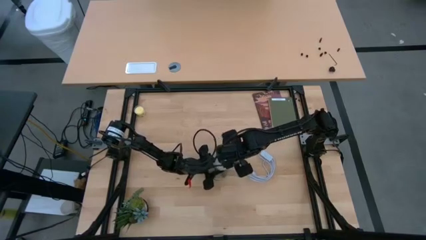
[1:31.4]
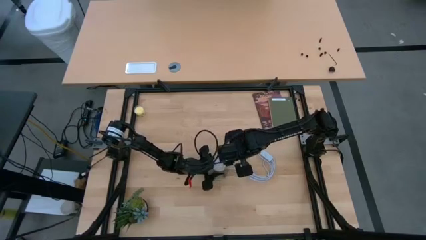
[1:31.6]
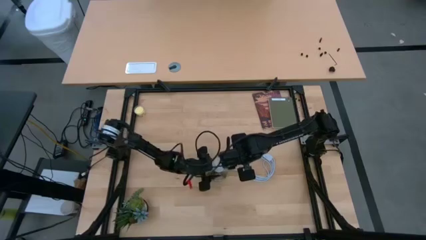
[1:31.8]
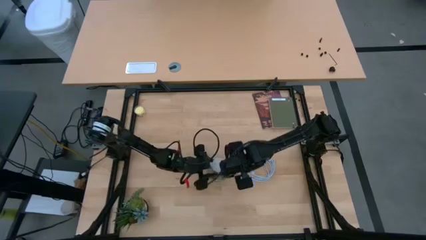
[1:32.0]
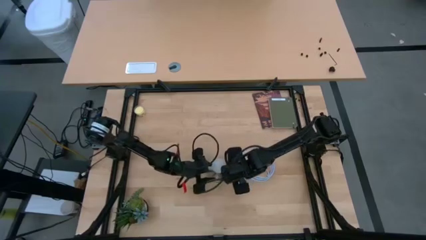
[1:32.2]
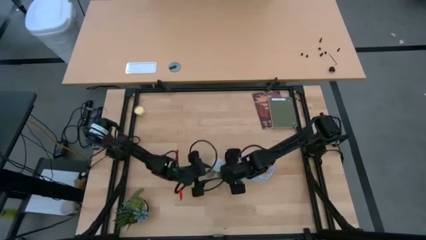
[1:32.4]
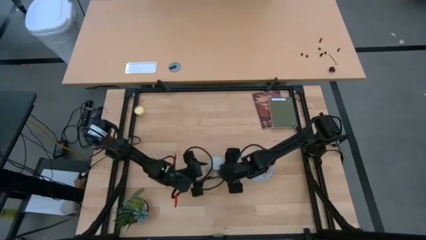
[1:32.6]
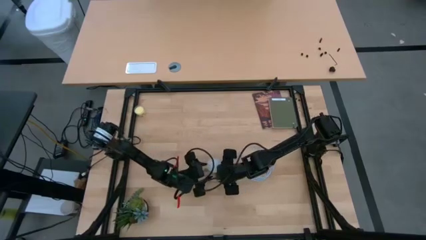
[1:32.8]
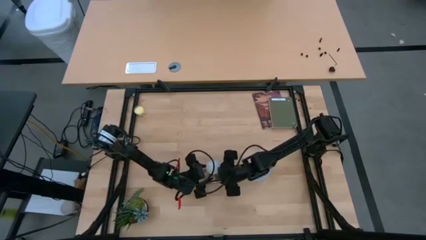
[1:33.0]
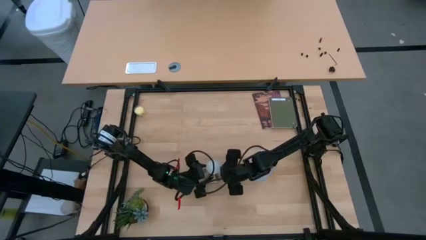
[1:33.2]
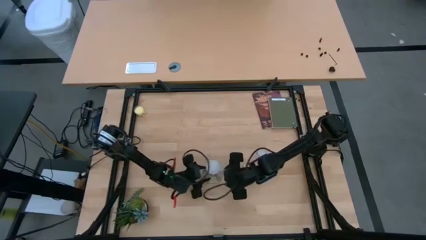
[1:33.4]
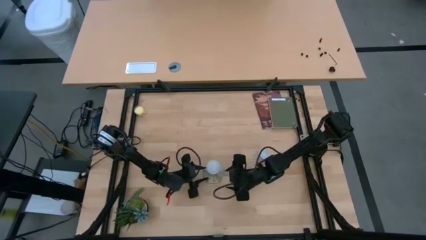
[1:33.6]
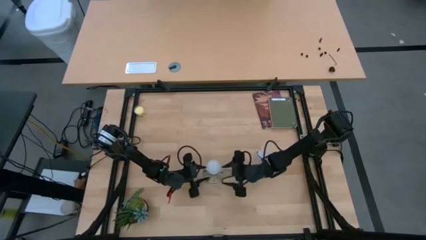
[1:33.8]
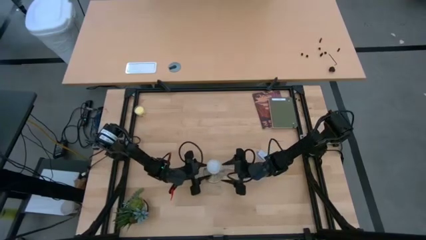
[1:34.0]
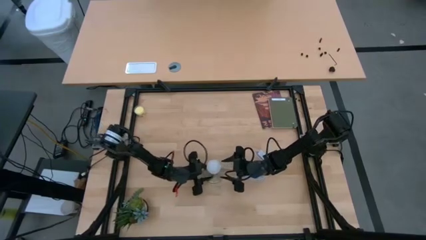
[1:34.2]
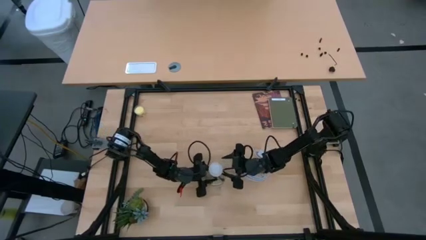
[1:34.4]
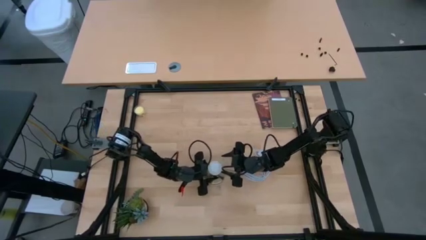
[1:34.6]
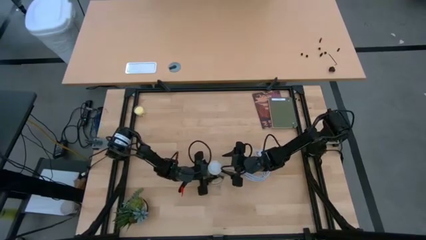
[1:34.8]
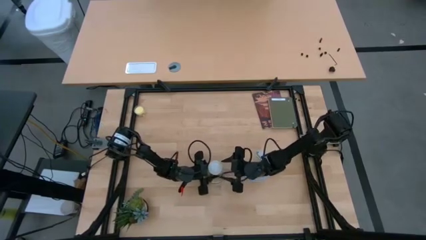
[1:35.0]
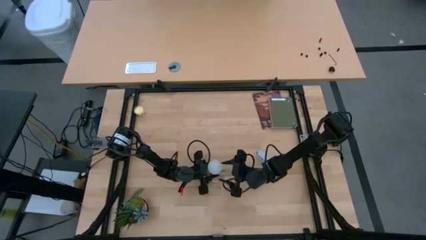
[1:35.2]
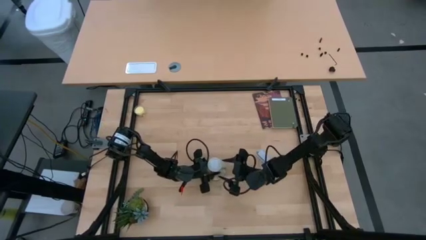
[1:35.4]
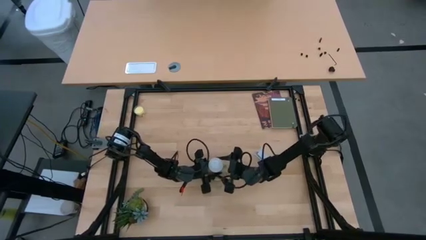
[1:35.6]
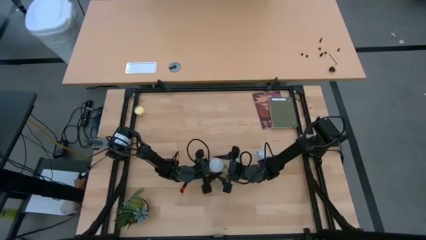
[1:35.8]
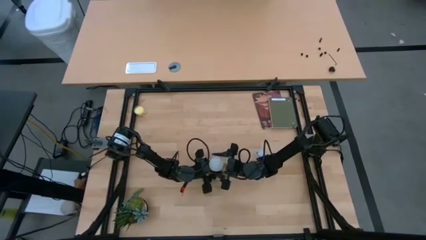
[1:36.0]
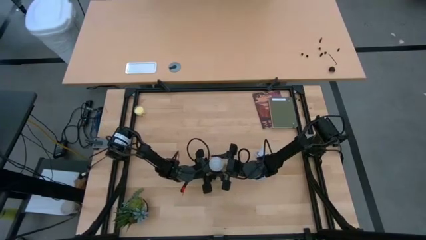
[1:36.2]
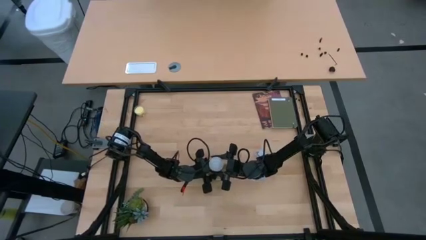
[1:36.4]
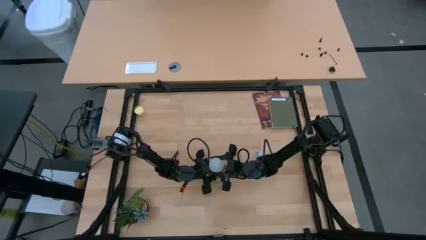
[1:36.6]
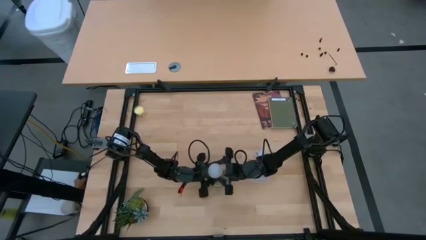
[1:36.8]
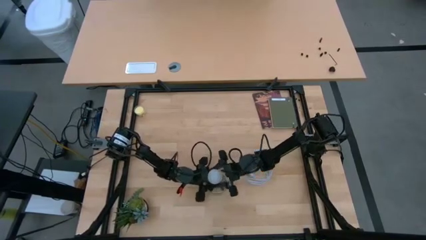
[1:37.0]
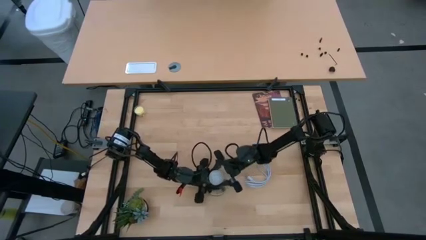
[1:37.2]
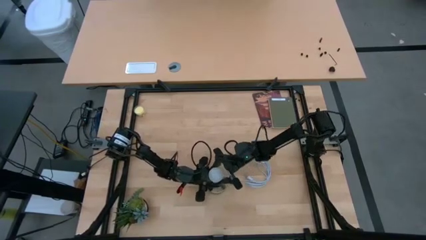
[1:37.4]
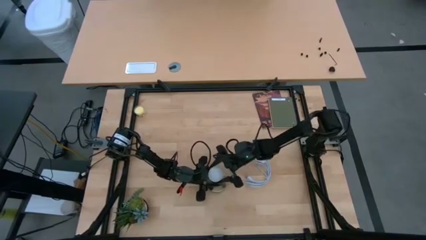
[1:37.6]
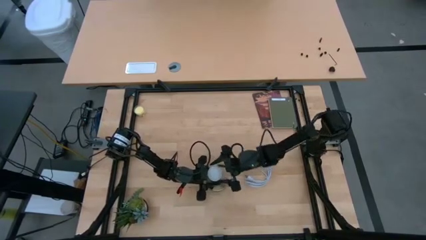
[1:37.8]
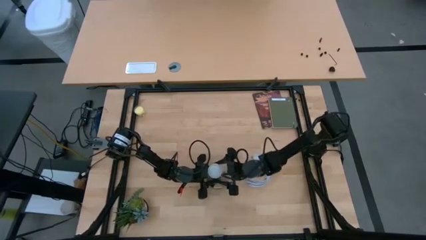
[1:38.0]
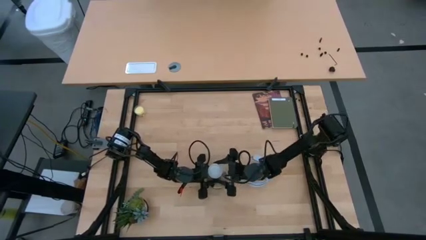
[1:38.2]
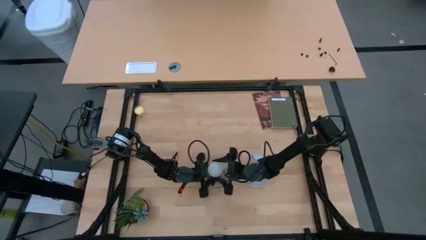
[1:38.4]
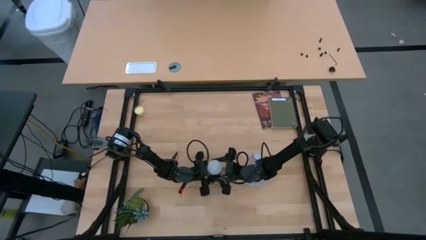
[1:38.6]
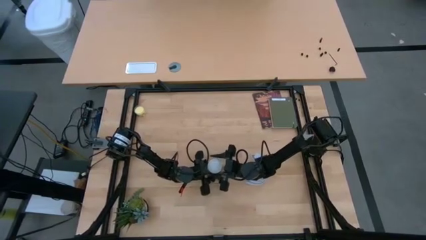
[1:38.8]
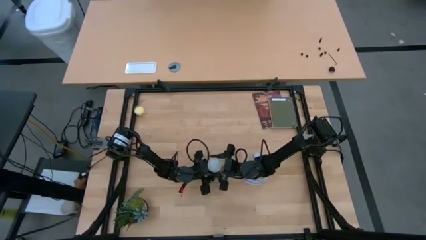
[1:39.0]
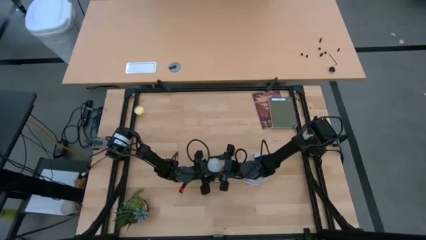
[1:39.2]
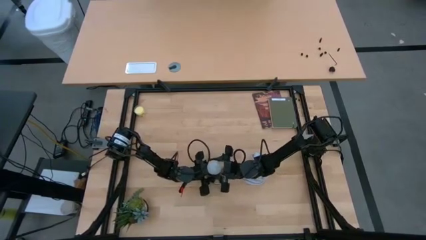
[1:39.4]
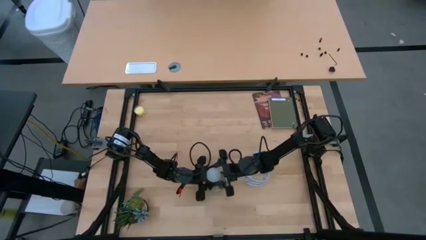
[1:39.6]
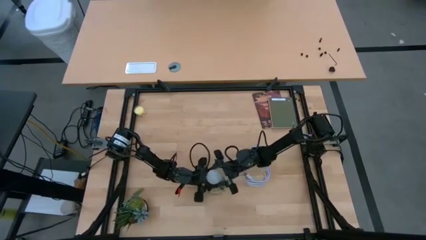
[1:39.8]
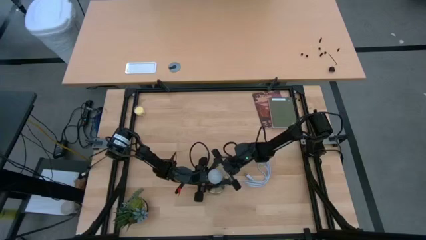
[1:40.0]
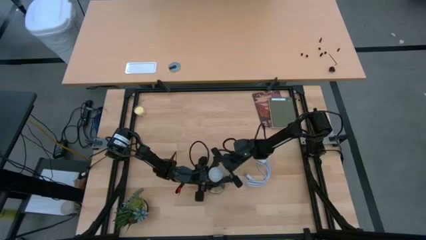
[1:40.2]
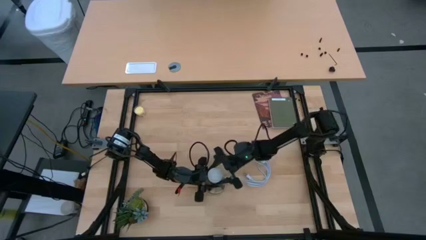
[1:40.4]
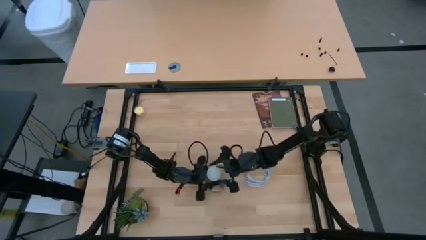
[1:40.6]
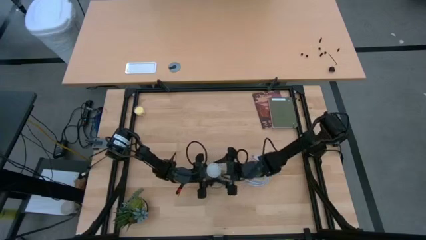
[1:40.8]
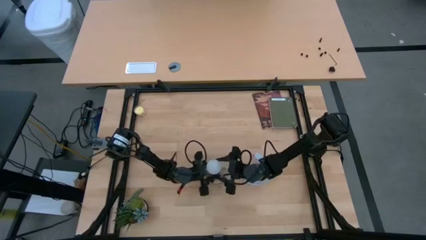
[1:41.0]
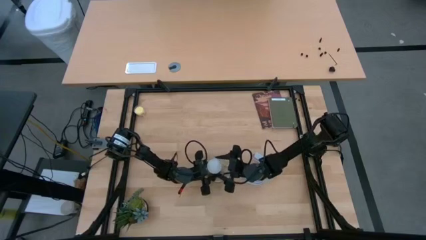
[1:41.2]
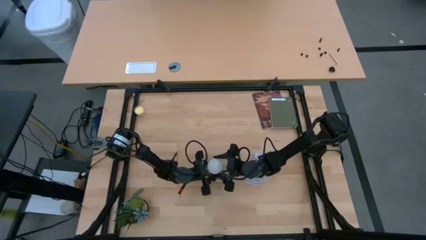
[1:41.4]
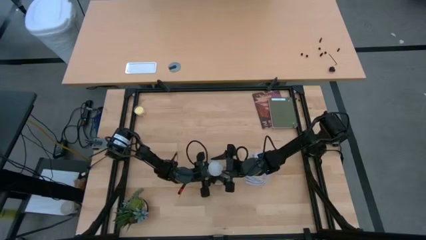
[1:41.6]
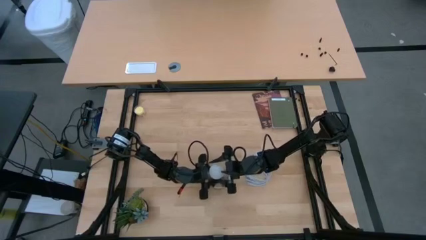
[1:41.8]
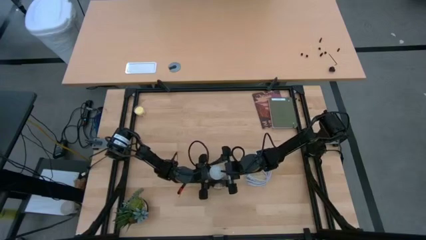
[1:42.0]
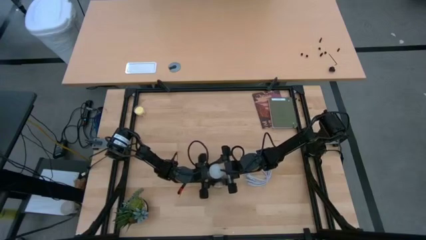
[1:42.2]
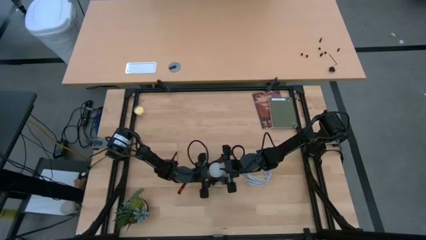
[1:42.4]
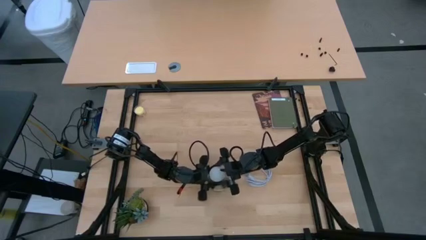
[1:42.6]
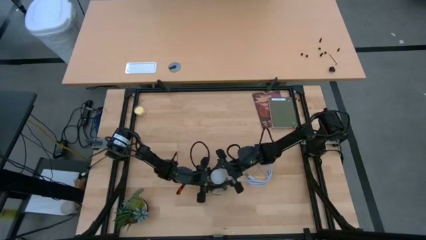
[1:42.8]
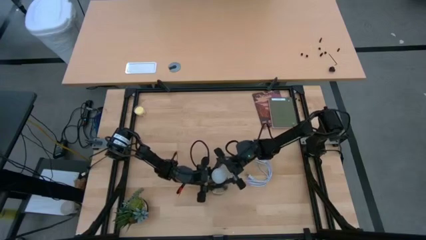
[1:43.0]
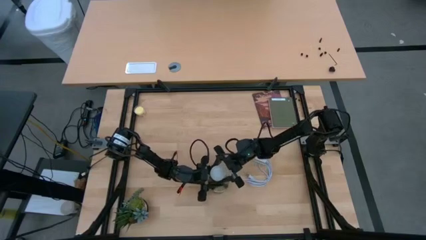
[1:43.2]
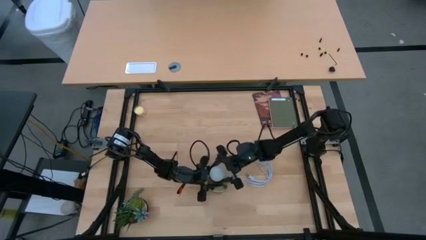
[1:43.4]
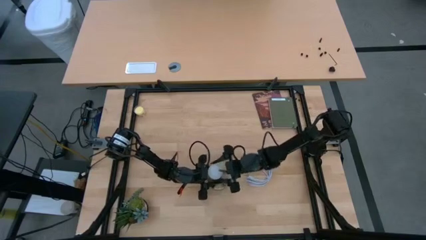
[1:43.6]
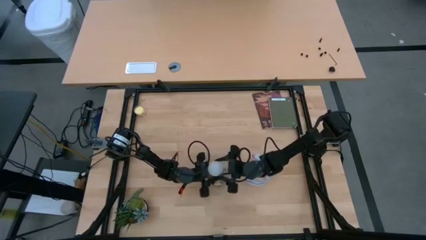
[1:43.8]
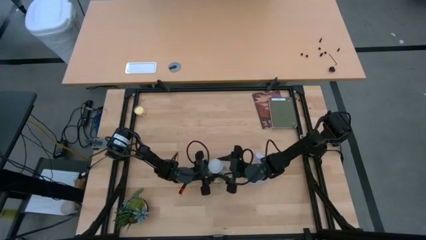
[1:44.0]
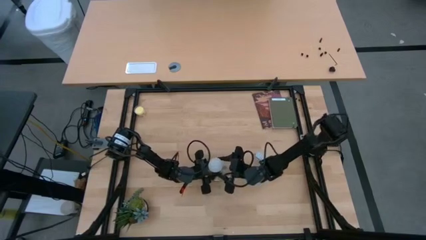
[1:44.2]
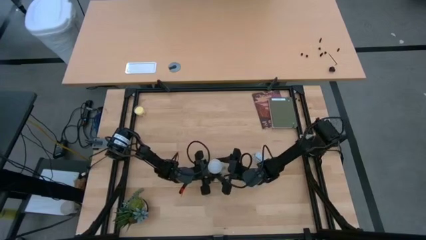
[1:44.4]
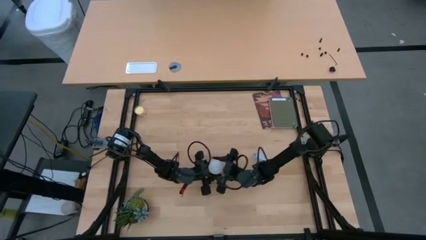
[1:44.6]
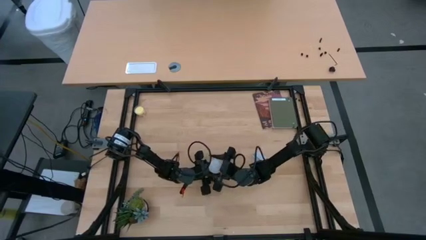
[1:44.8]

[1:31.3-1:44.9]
Task: Screw lightbulb
Remove the lightbulb from the lamp

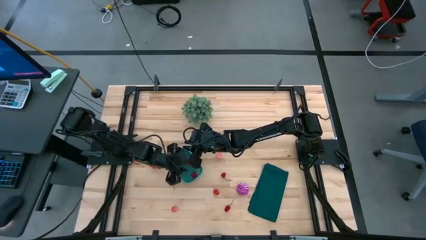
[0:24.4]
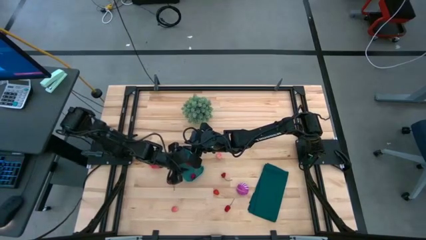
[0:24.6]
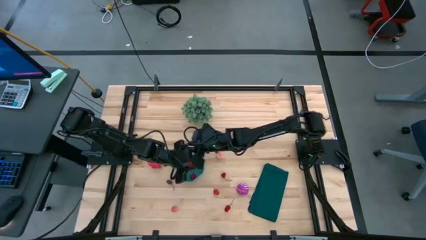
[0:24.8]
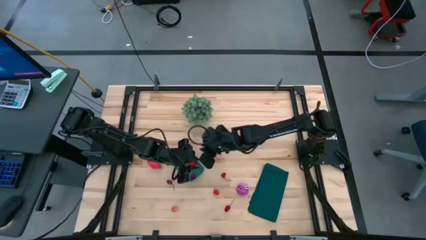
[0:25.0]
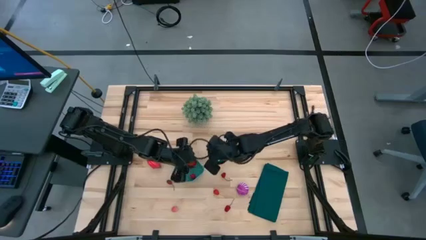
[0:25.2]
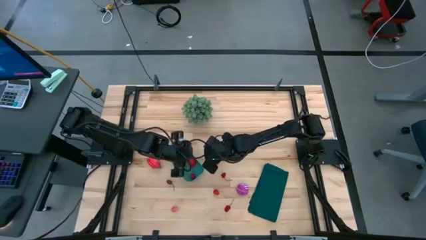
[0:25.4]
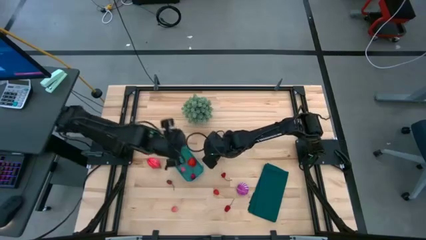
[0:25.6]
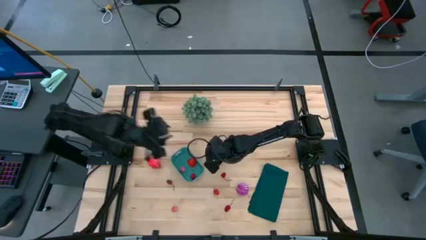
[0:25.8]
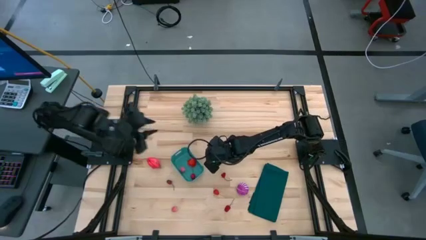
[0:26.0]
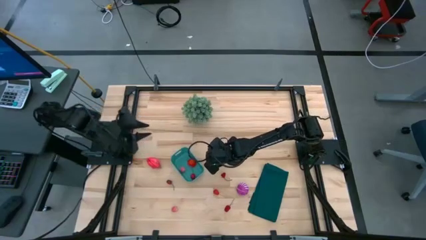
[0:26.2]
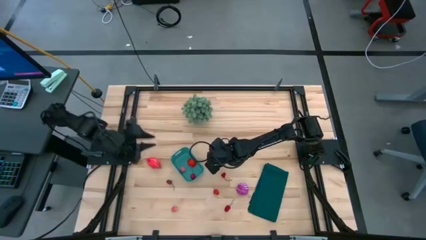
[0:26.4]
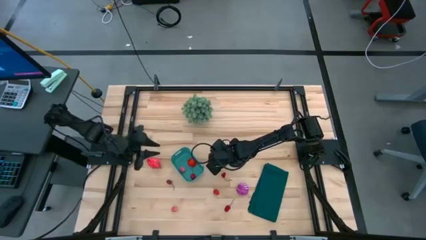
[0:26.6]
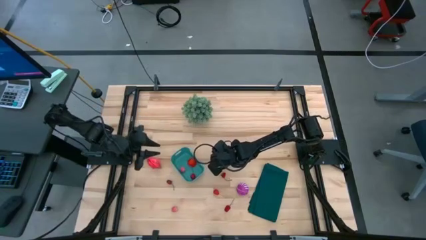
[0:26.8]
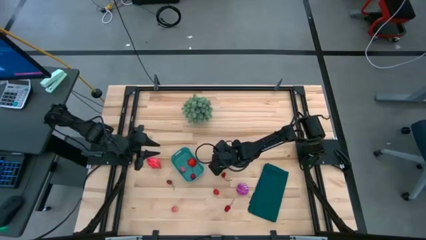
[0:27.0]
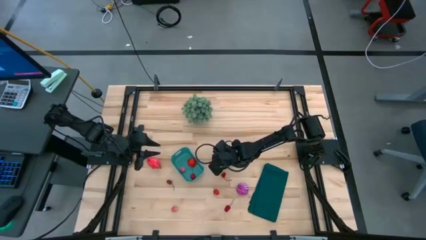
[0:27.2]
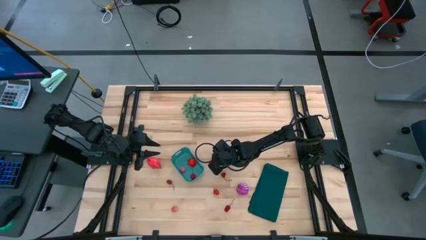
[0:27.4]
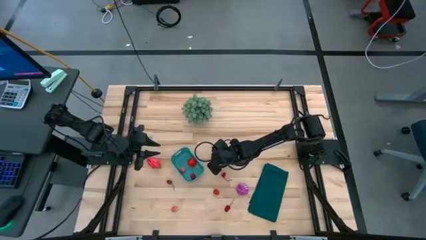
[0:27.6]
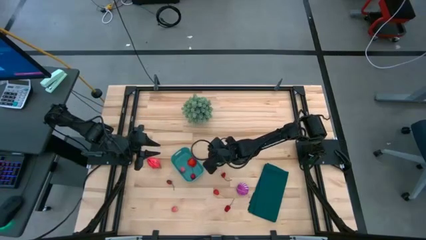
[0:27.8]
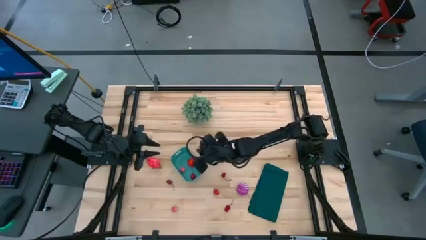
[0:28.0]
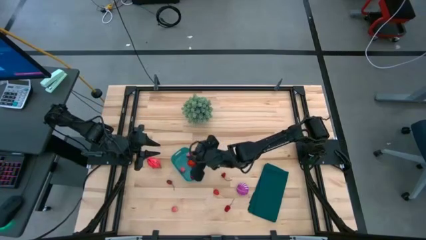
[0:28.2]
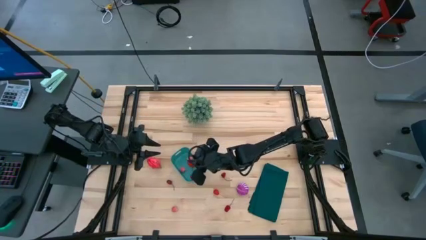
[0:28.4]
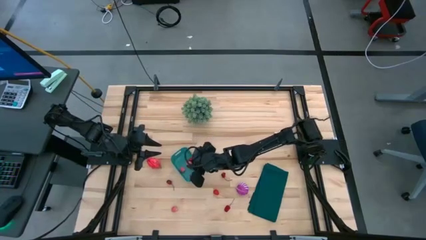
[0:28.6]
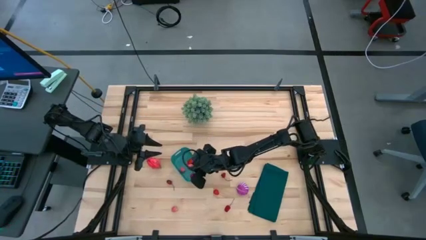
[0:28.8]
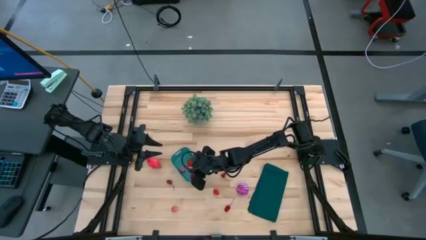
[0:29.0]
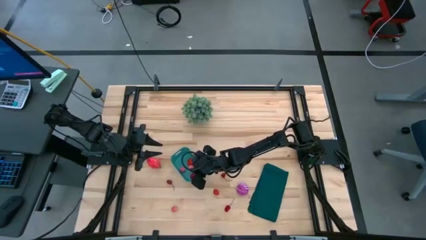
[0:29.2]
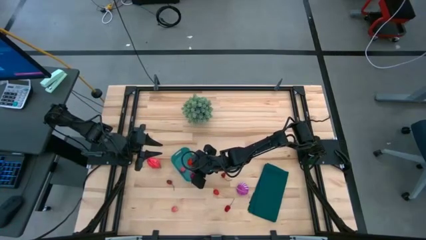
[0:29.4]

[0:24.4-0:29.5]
Task: Pick and placing Produce into tupperware
Put the pink peach into the green bin
